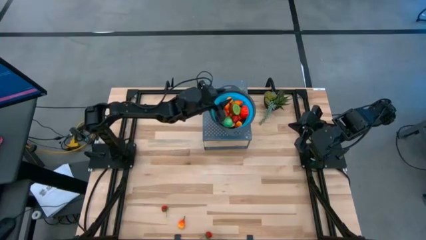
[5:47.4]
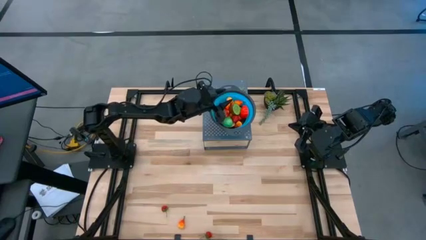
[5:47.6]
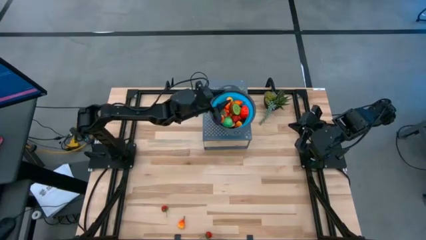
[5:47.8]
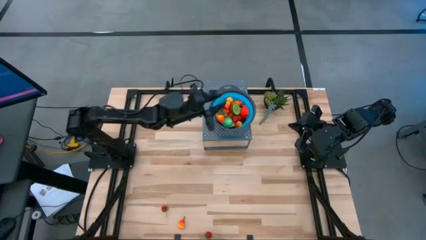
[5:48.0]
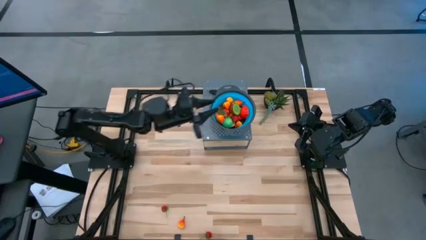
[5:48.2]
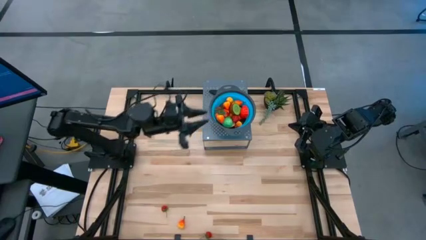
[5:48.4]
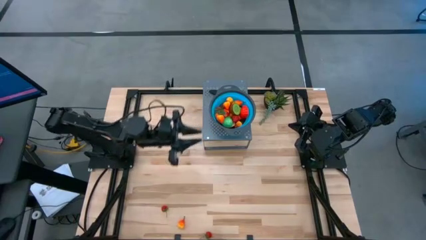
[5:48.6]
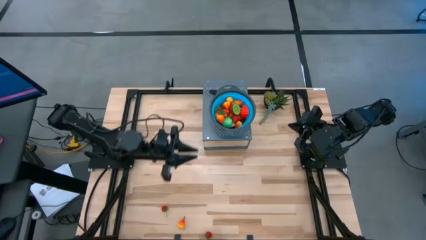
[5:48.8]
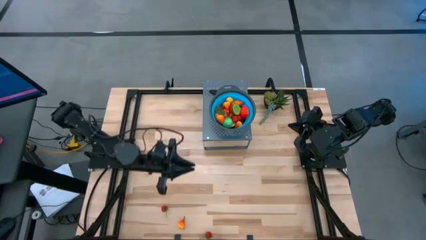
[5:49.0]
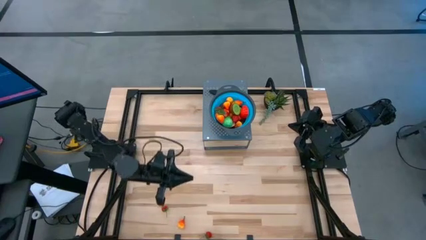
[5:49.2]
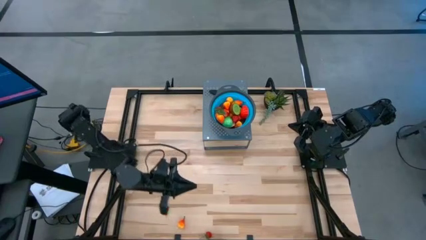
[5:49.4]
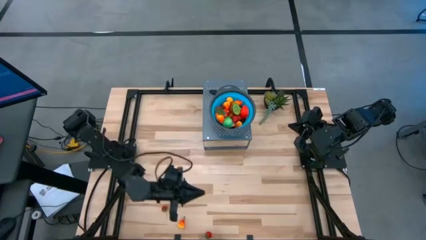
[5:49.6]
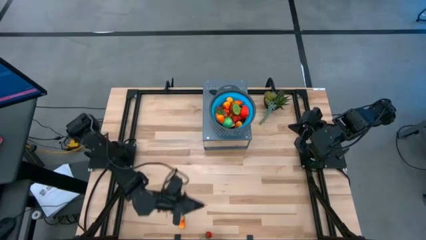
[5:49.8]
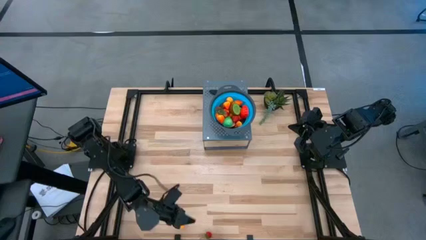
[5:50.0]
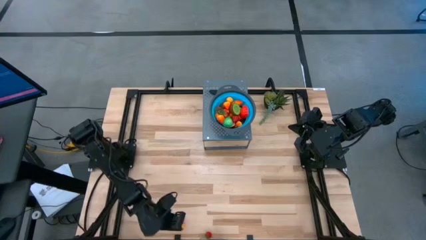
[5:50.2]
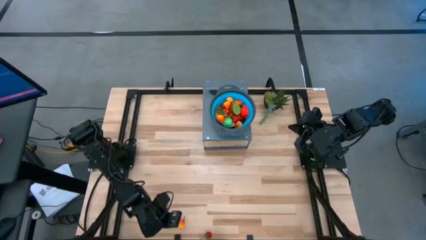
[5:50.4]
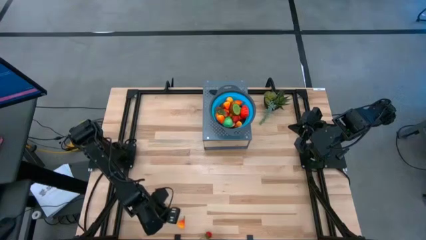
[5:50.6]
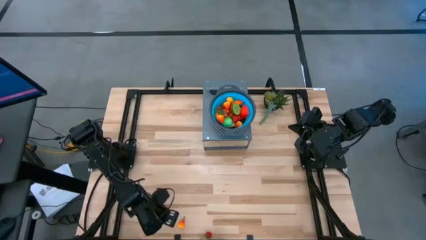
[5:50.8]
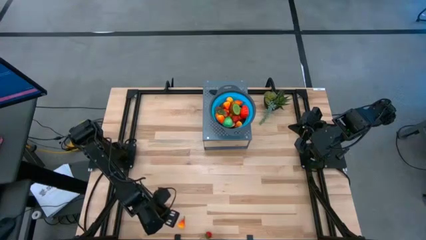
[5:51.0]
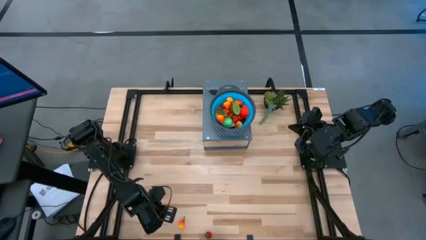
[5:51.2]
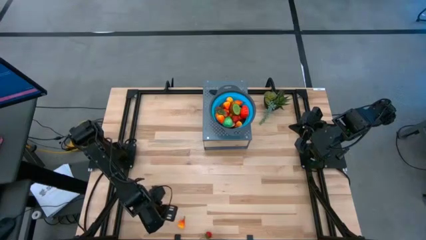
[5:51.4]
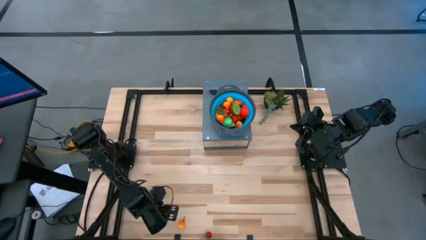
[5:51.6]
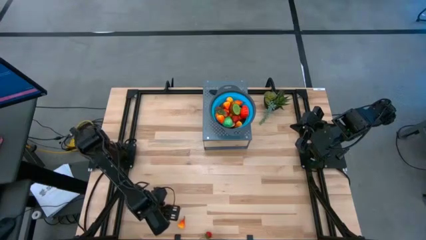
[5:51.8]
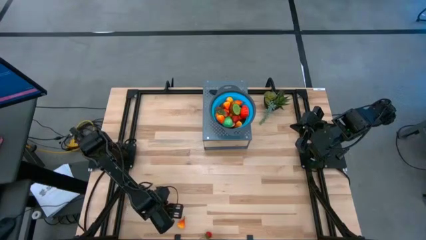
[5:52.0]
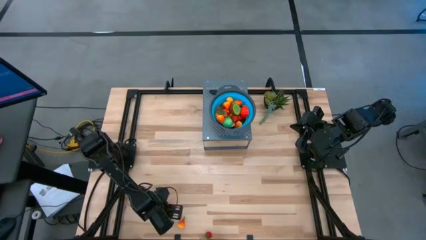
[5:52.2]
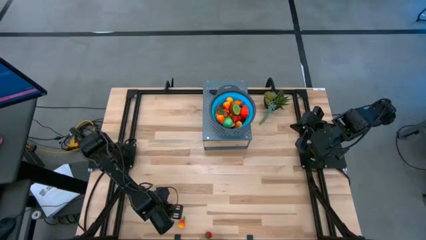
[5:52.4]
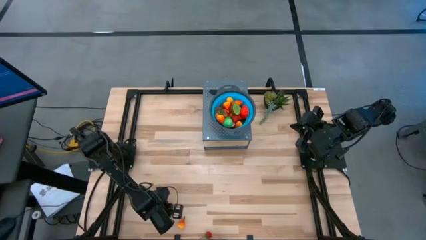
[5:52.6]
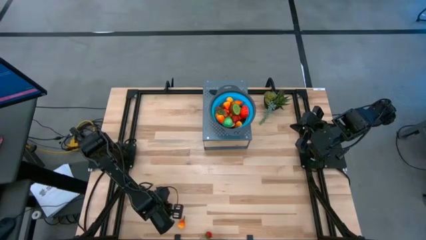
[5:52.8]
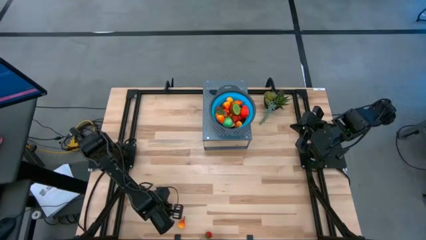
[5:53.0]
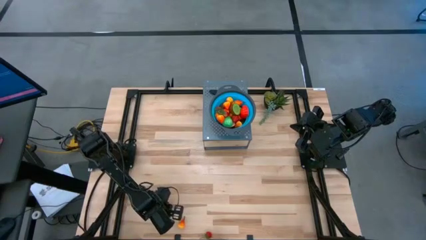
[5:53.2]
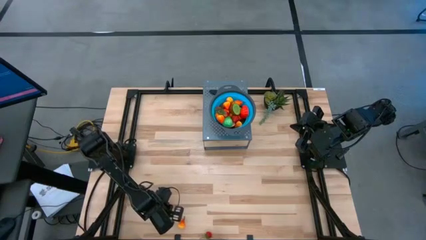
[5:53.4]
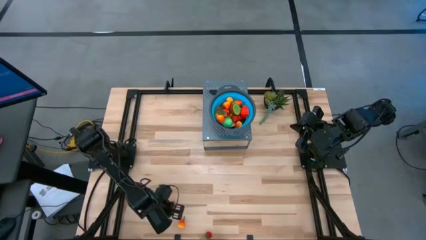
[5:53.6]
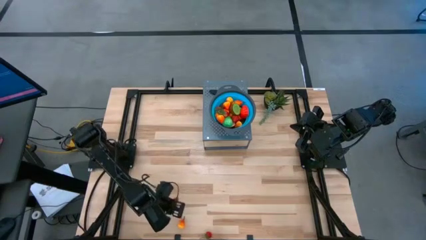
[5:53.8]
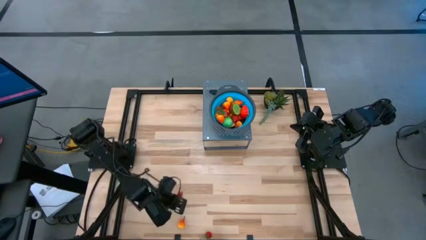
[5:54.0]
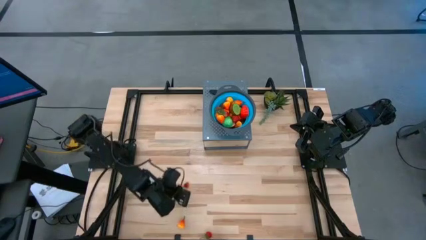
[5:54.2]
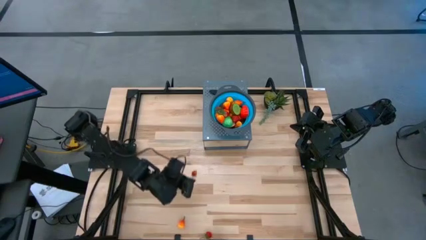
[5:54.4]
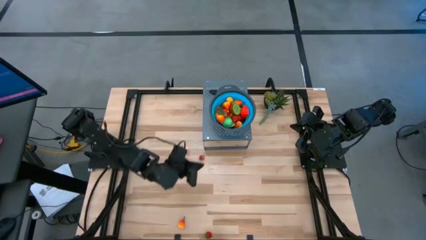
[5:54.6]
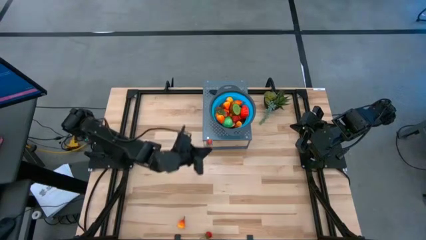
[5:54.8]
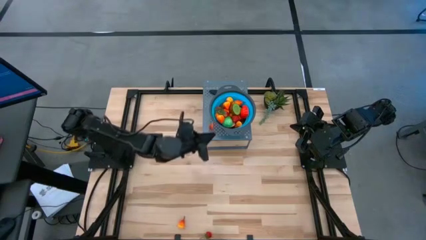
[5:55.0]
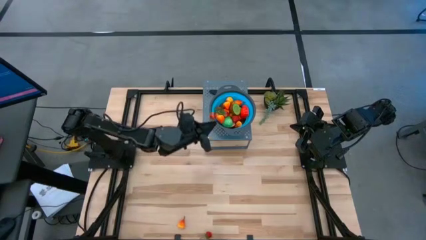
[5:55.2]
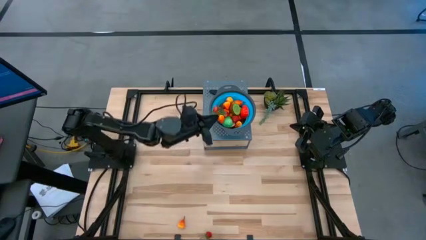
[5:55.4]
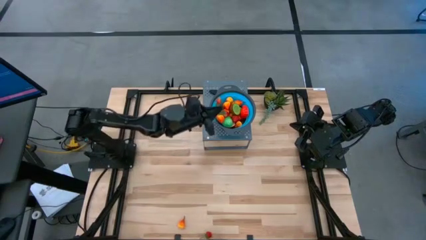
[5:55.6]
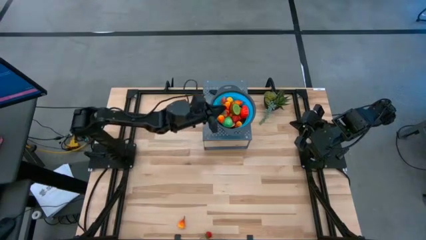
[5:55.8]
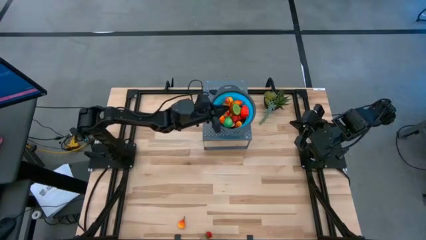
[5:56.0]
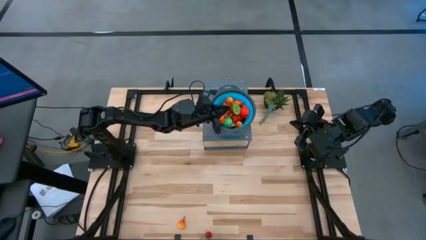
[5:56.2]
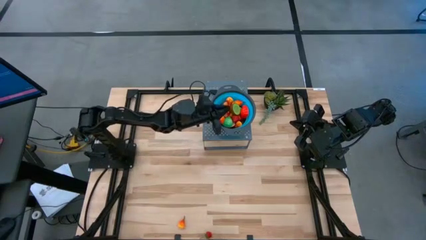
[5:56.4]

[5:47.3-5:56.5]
Task: Pick & Place Fruit
Put the top strawberry into the strainer bowl

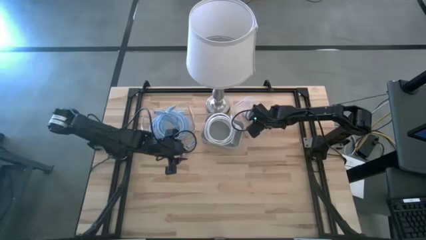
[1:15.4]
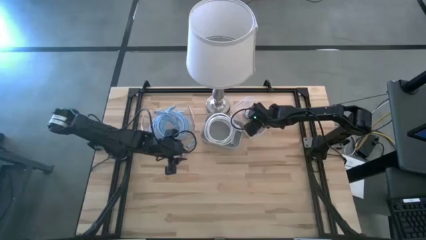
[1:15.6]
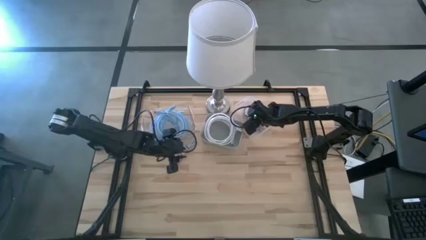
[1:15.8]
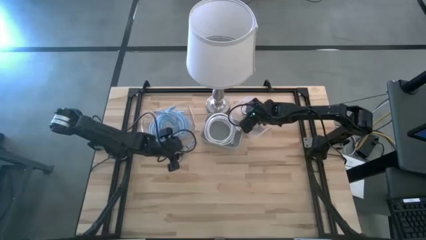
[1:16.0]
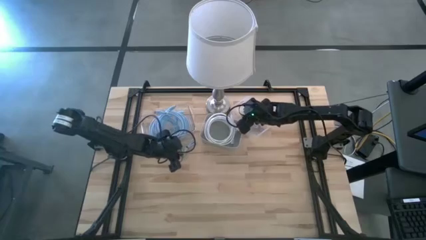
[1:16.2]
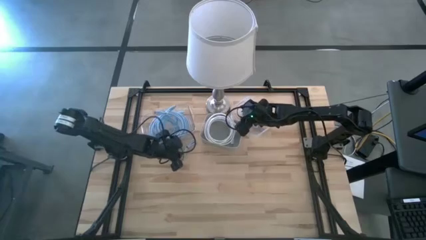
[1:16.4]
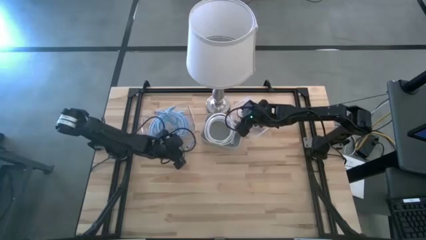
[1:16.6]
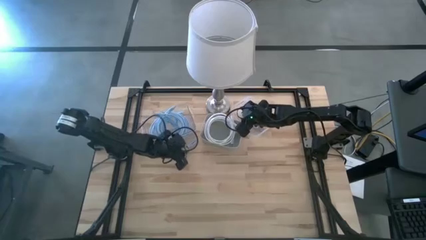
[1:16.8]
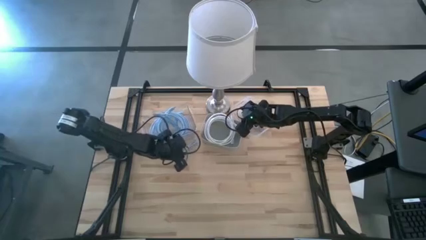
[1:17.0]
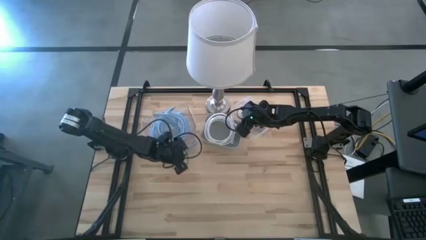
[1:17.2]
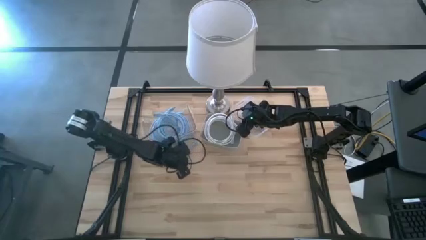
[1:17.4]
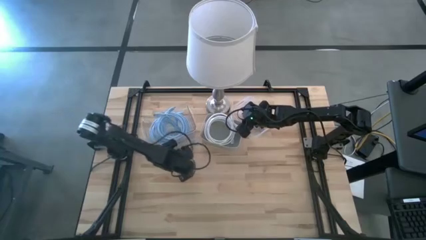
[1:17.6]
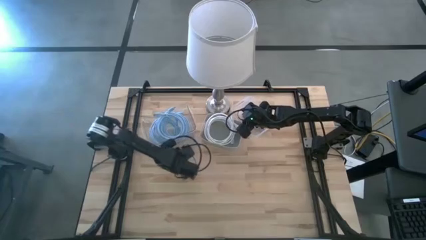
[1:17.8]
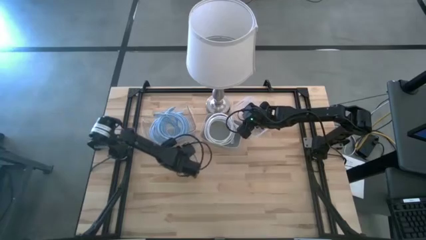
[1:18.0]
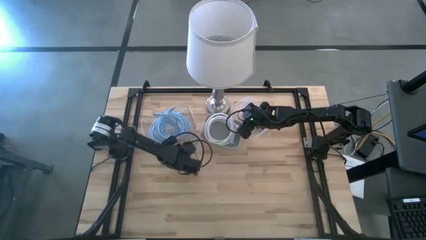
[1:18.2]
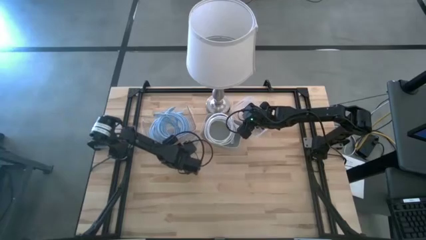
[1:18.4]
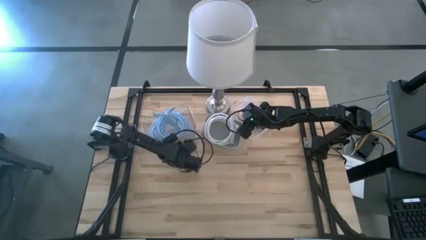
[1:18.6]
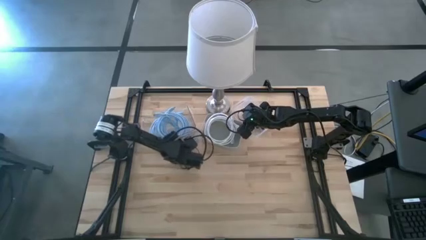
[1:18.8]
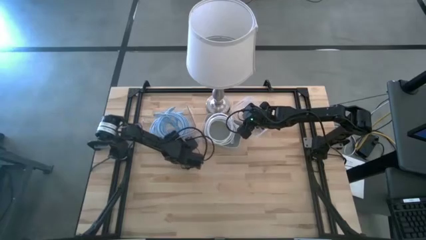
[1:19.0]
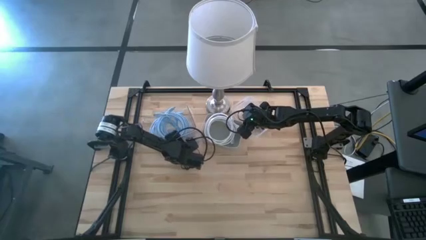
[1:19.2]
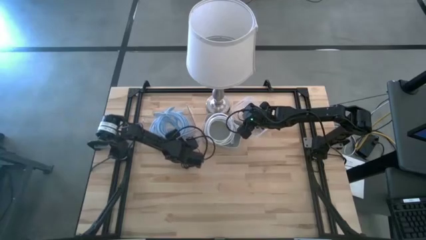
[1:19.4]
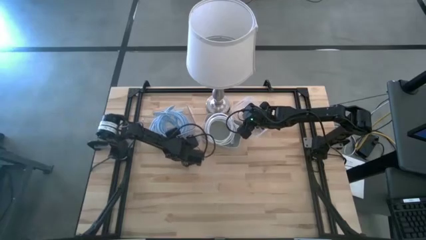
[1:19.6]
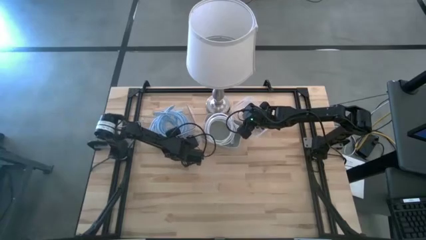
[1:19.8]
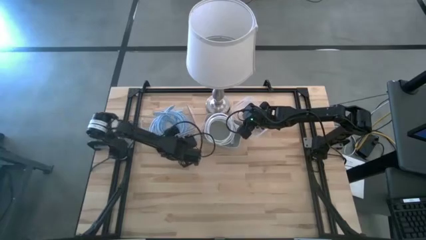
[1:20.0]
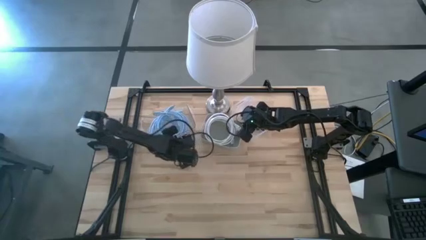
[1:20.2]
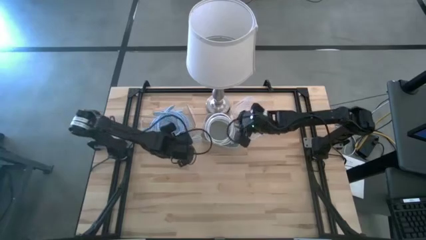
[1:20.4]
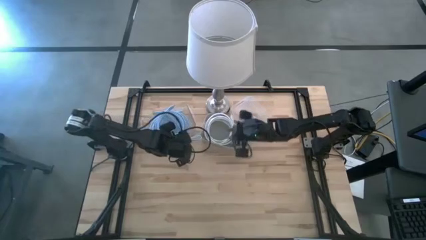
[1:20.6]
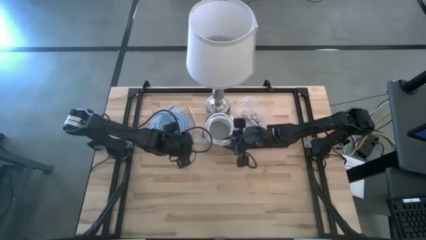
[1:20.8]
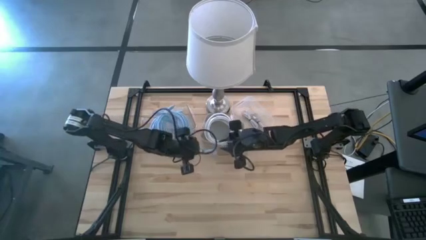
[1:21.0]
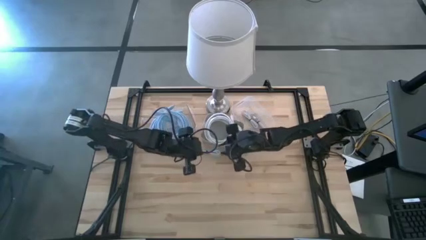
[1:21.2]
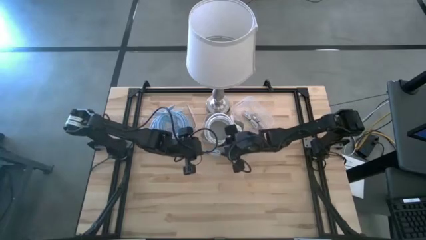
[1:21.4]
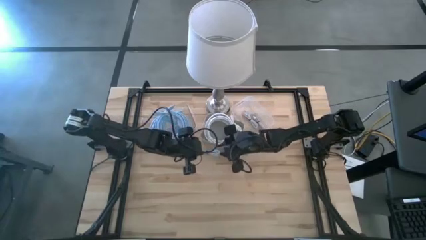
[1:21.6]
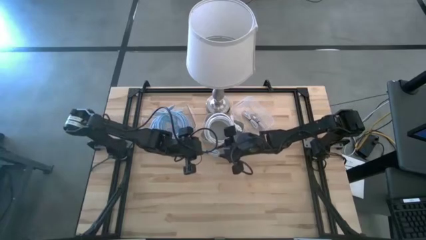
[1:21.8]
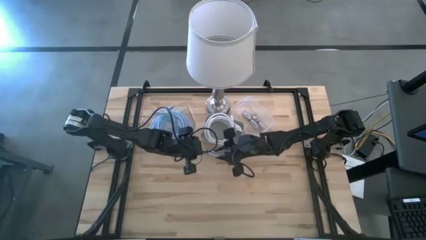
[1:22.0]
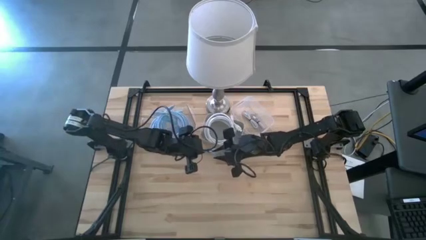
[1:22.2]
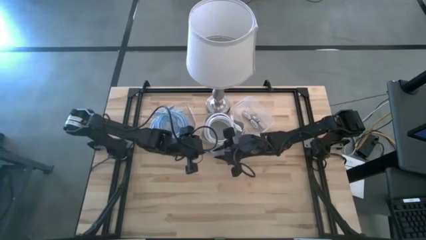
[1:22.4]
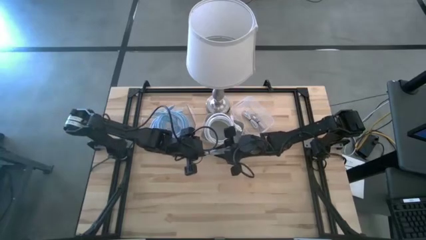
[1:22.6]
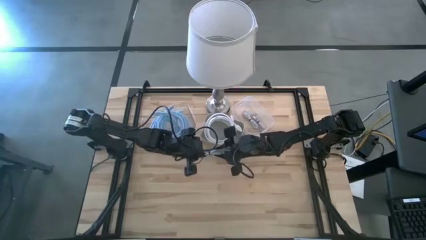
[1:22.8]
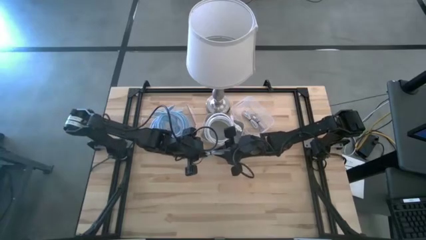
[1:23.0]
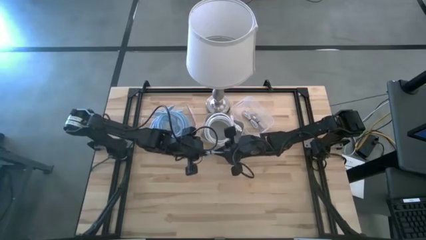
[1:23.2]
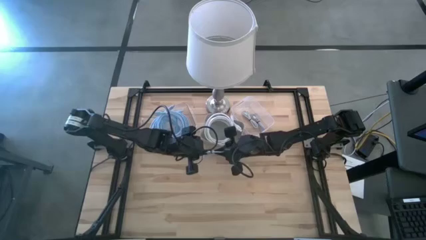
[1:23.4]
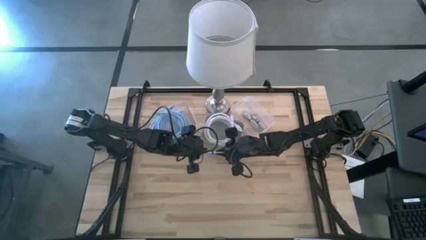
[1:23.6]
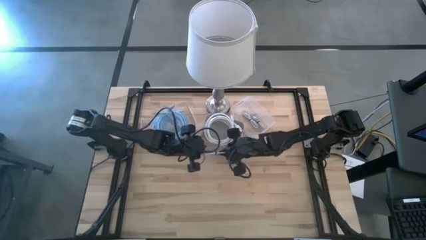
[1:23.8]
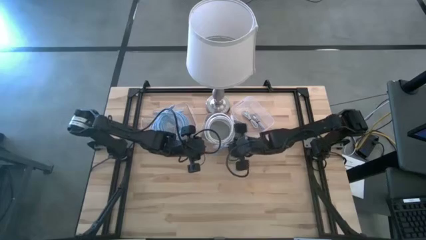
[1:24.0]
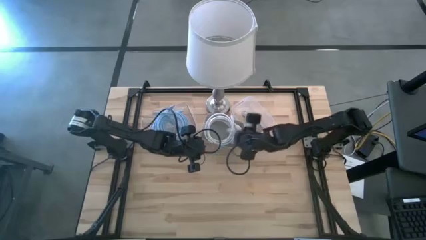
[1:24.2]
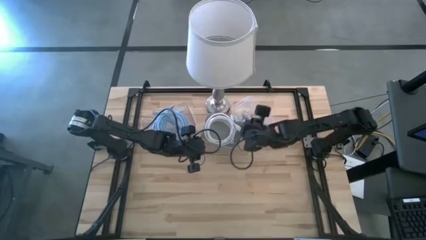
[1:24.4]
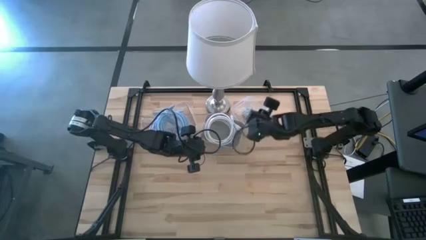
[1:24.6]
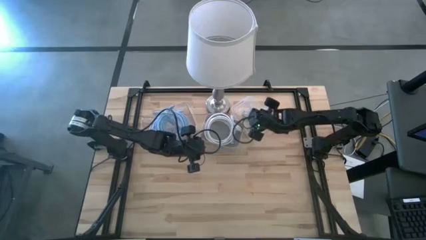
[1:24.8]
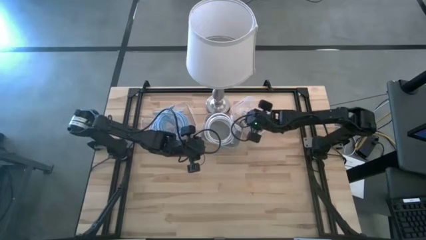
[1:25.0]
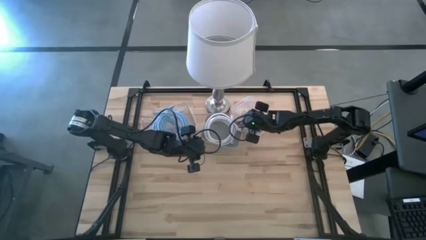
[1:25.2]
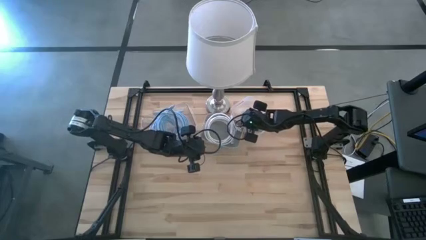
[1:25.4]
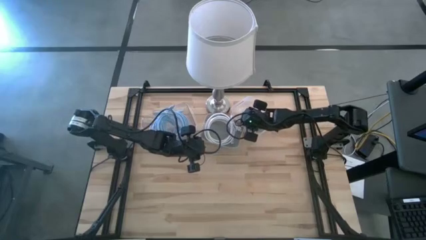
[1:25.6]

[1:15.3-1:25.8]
Task: Pick & Place USB Port
Put the blue USB cable into the right transparent bin
